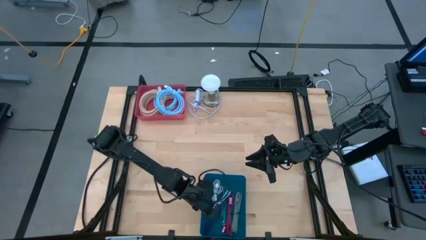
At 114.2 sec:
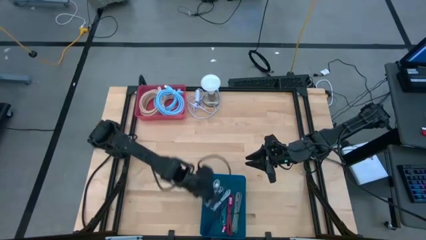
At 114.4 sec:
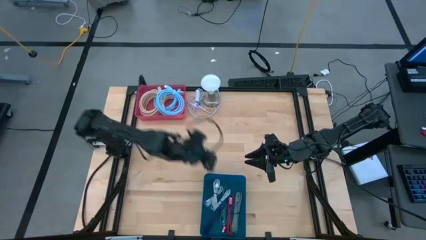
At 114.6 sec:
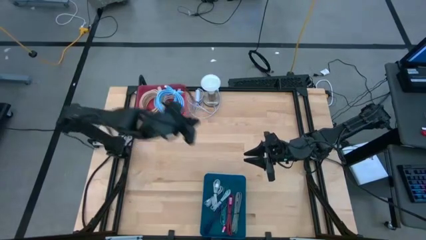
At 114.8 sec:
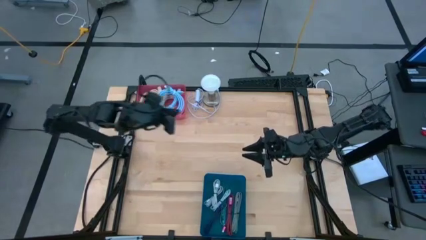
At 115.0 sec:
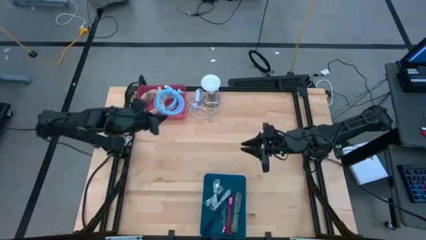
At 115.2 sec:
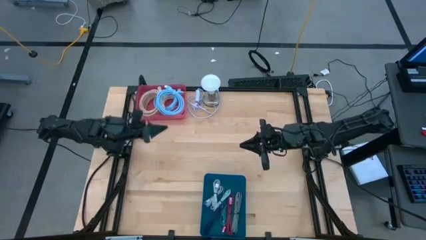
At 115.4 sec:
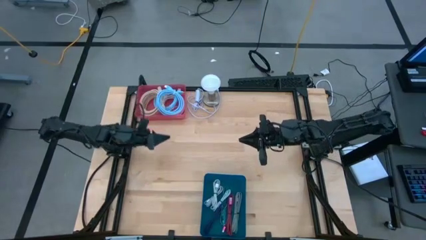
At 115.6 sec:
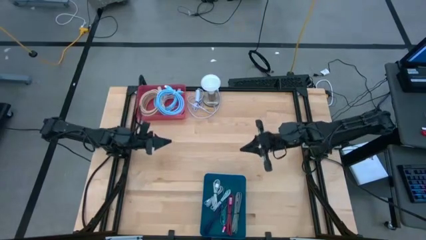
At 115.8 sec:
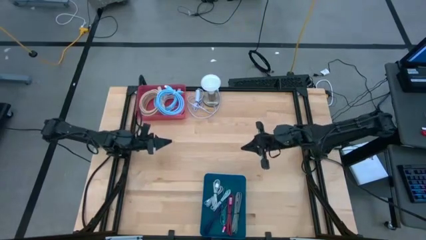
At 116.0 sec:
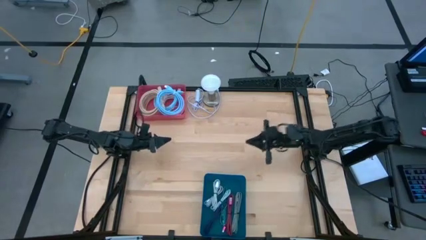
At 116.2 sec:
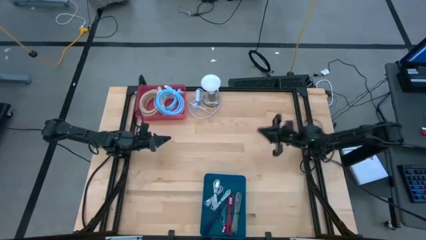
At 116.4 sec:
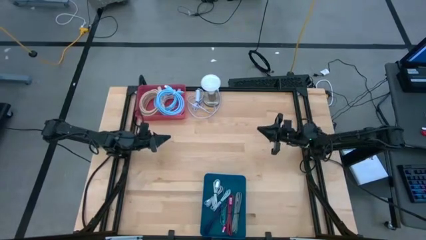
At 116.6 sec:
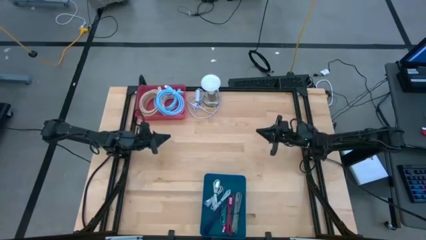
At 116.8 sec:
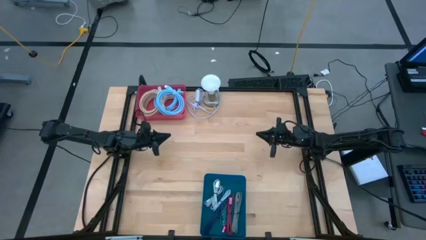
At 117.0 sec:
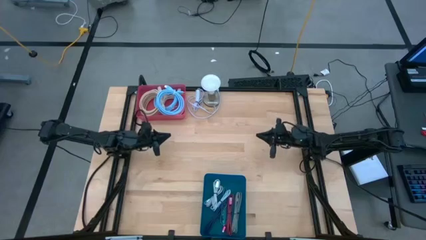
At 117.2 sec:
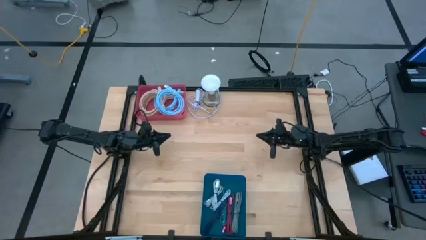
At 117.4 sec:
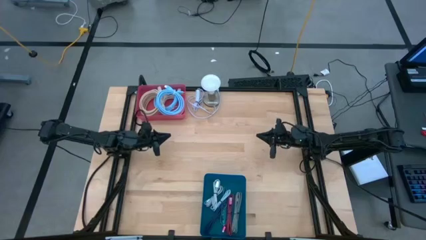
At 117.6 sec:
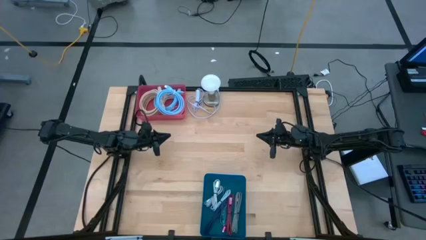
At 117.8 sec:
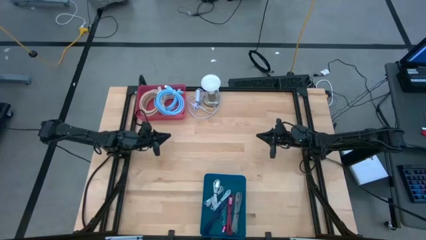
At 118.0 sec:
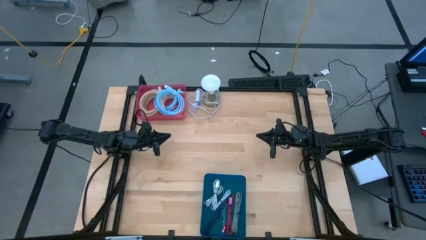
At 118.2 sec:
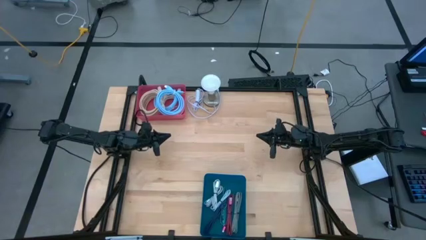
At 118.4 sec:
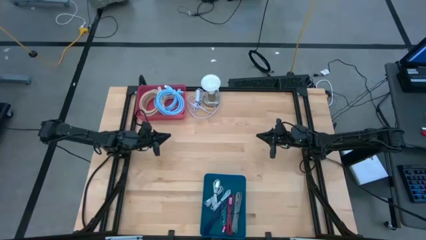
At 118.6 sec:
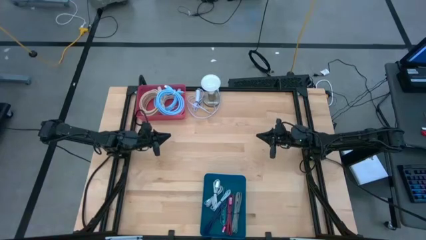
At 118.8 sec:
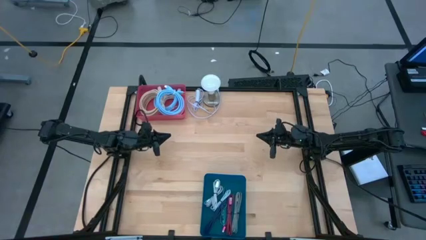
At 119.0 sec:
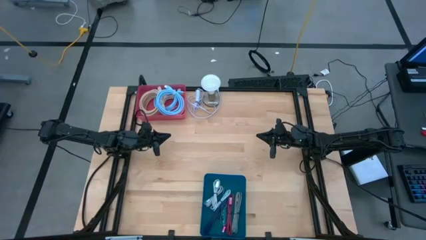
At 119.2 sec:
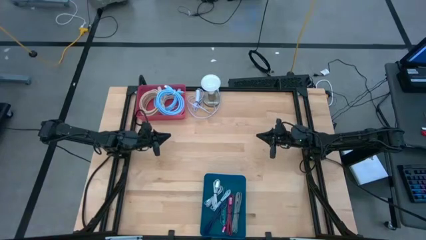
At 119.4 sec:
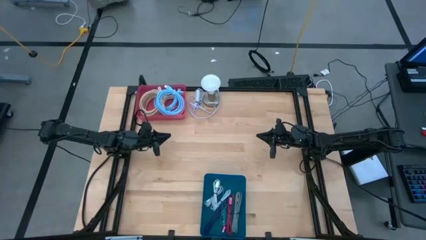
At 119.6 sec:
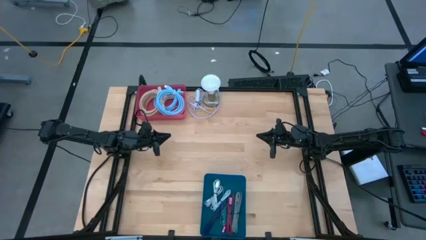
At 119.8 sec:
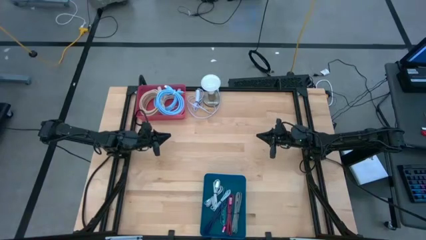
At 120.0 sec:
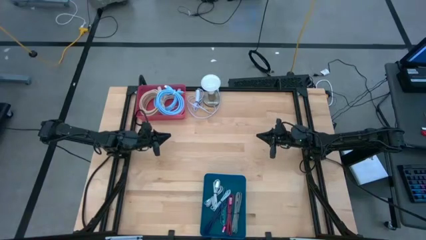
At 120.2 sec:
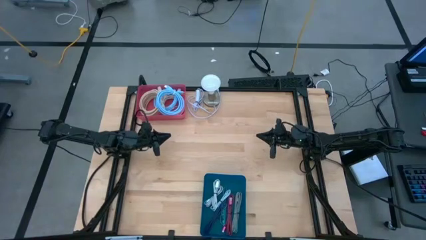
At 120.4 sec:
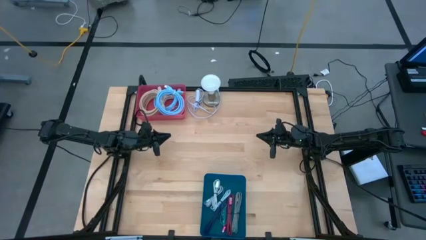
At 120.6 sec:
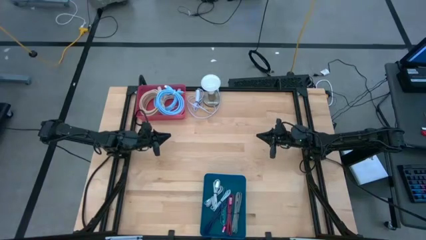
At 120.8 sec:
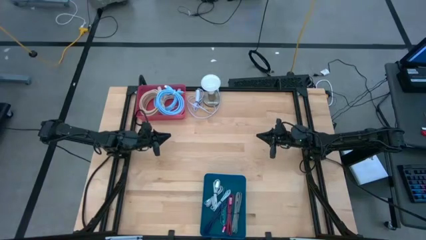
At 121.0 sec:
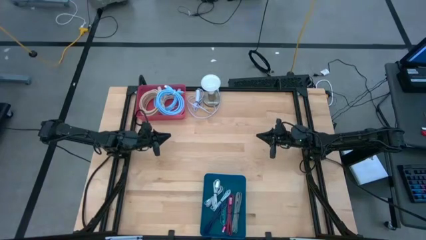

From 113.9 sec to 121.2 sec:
Task: Pick & Place USB Port
Return to Home Position
